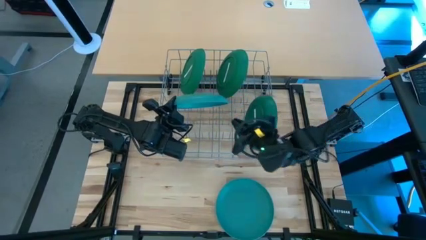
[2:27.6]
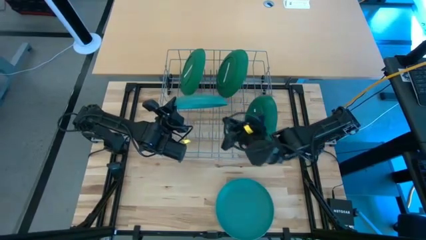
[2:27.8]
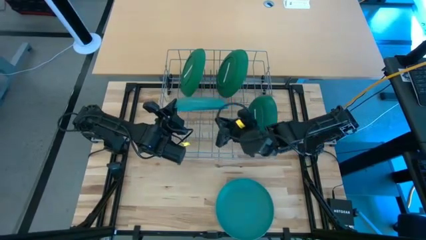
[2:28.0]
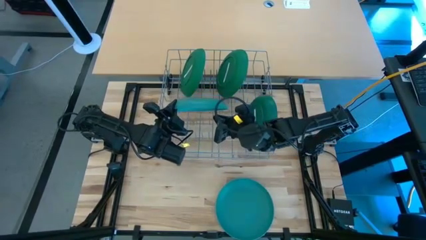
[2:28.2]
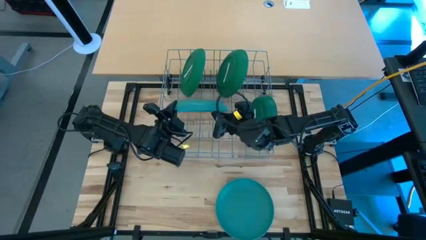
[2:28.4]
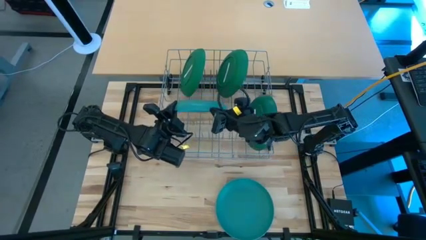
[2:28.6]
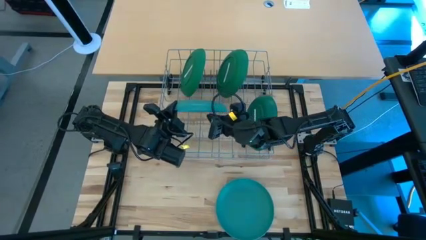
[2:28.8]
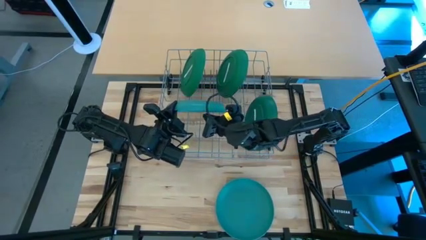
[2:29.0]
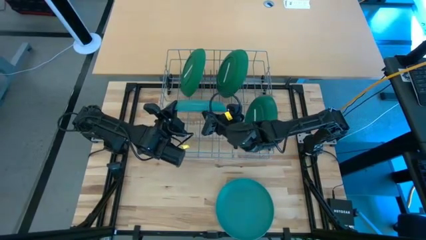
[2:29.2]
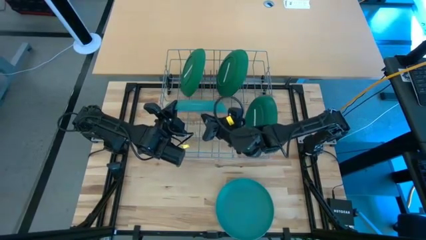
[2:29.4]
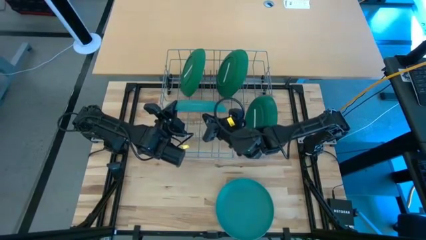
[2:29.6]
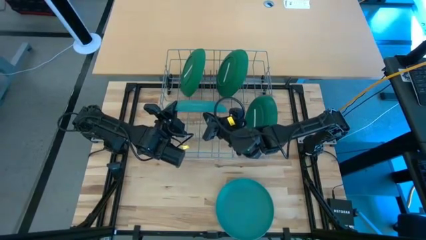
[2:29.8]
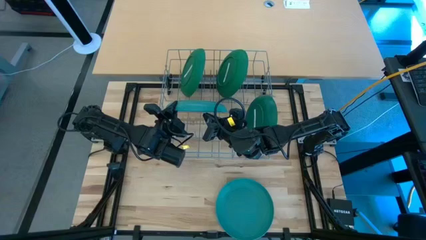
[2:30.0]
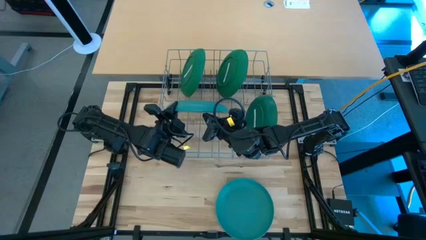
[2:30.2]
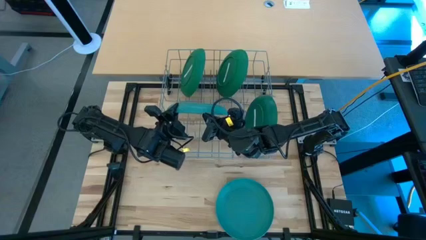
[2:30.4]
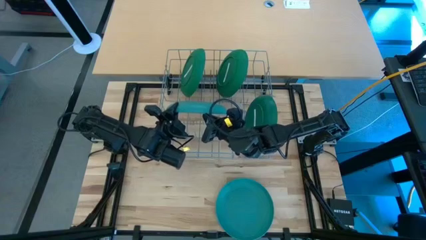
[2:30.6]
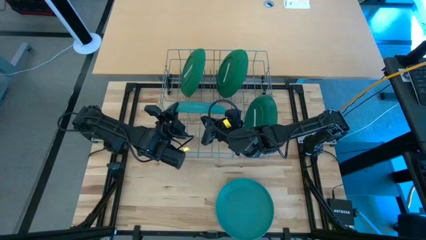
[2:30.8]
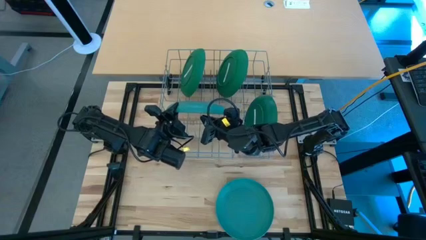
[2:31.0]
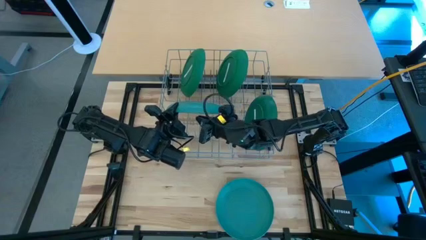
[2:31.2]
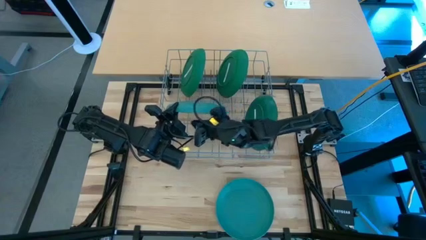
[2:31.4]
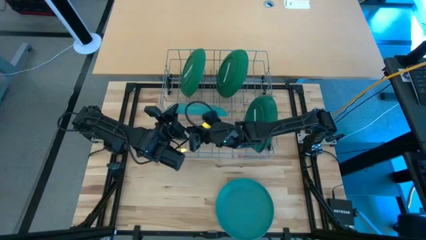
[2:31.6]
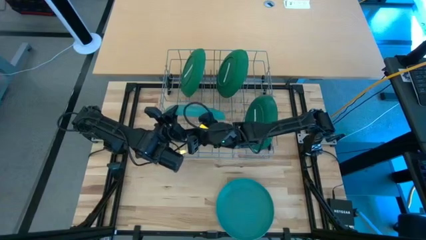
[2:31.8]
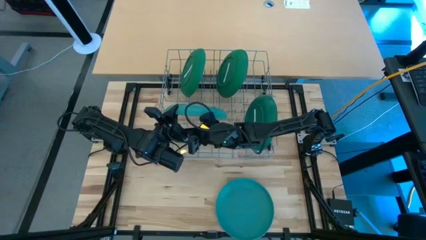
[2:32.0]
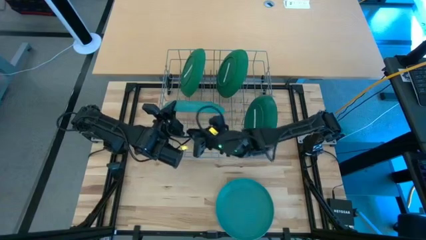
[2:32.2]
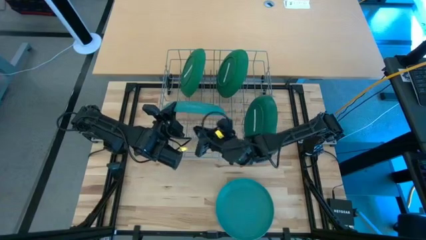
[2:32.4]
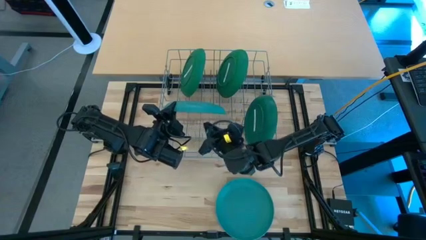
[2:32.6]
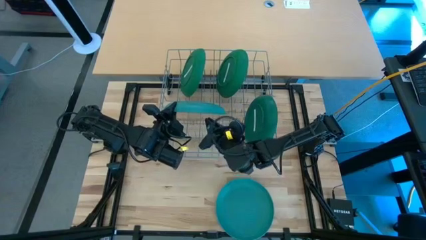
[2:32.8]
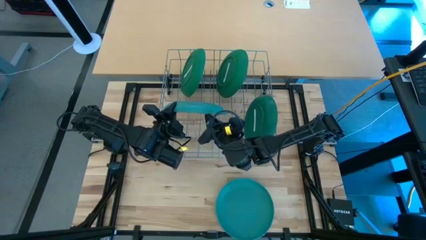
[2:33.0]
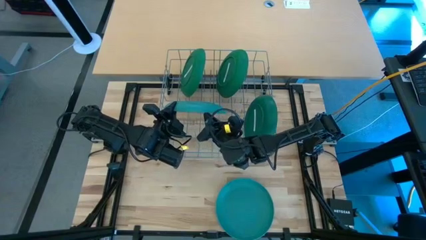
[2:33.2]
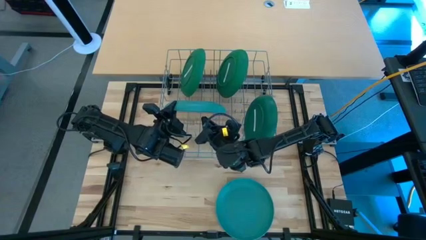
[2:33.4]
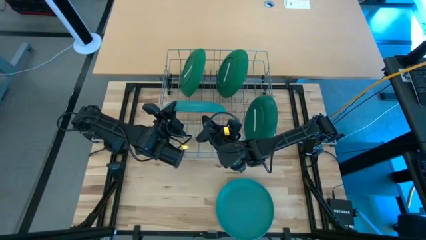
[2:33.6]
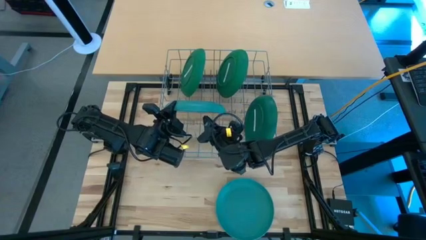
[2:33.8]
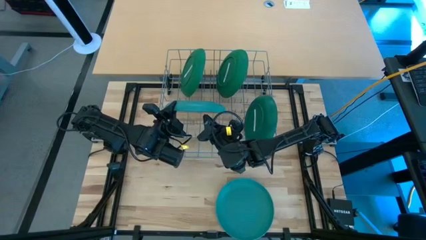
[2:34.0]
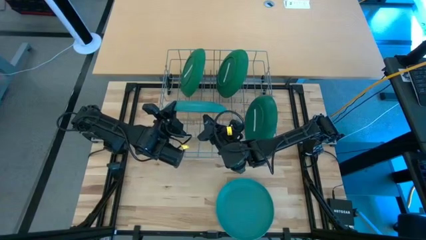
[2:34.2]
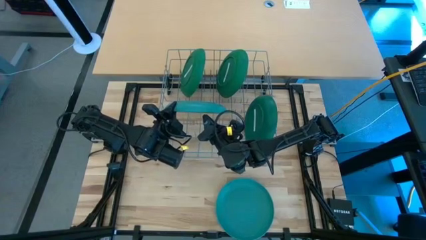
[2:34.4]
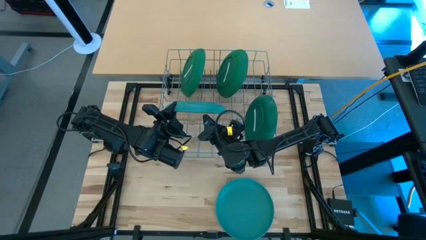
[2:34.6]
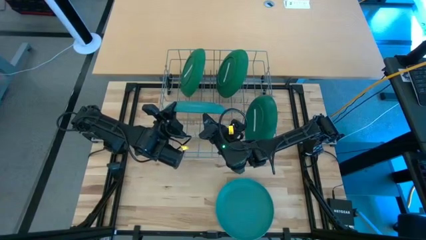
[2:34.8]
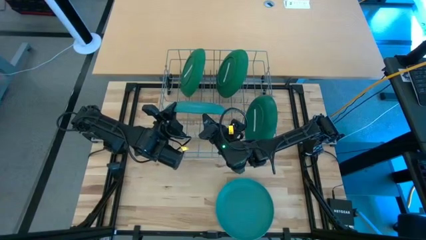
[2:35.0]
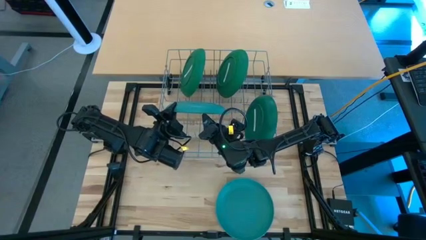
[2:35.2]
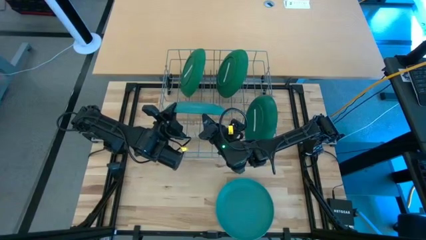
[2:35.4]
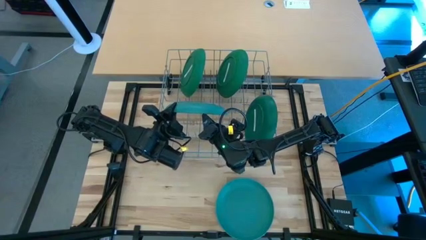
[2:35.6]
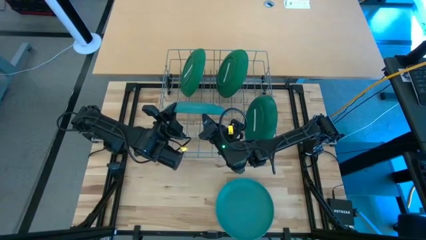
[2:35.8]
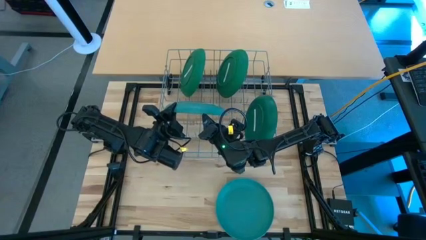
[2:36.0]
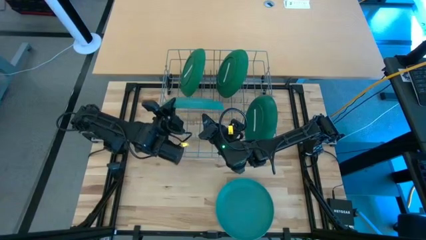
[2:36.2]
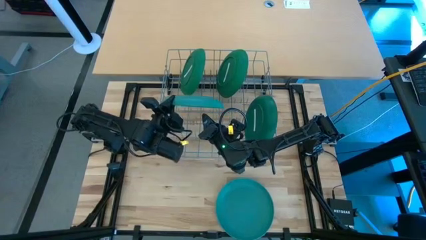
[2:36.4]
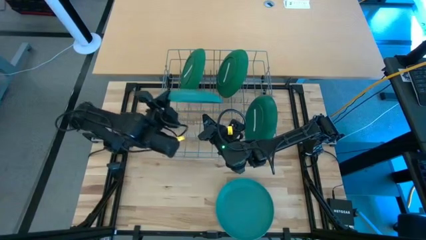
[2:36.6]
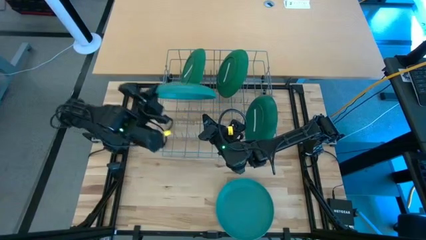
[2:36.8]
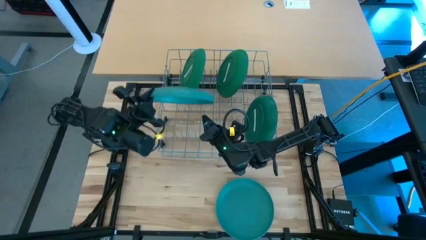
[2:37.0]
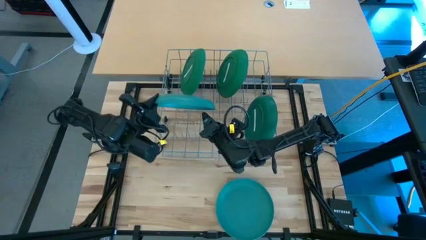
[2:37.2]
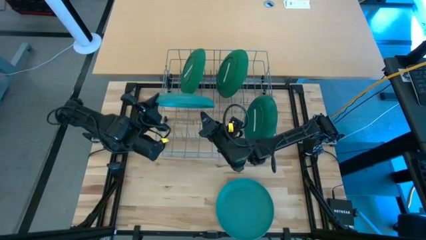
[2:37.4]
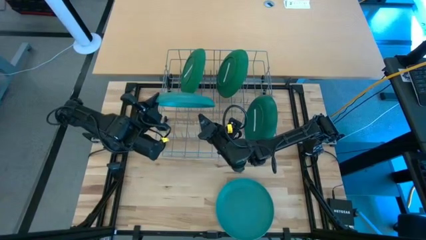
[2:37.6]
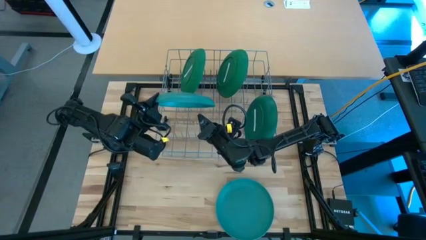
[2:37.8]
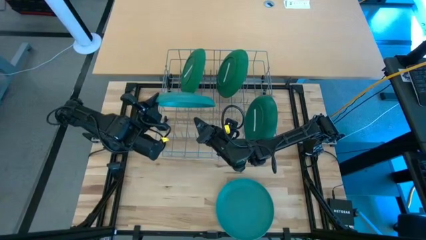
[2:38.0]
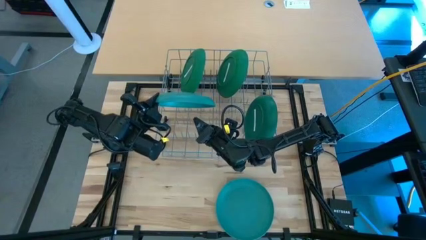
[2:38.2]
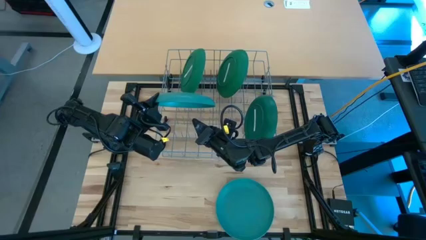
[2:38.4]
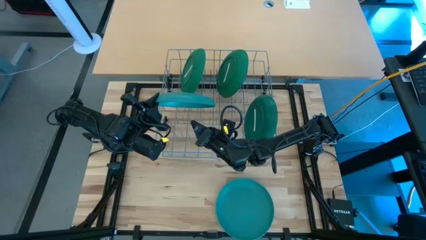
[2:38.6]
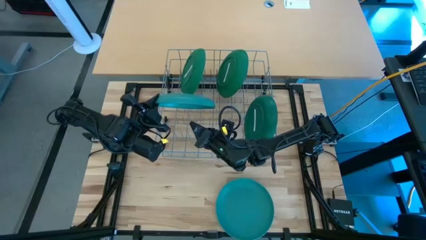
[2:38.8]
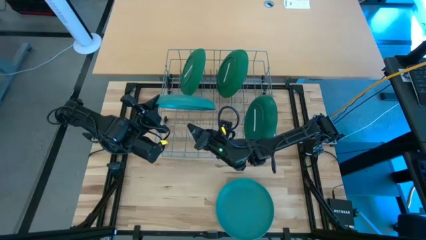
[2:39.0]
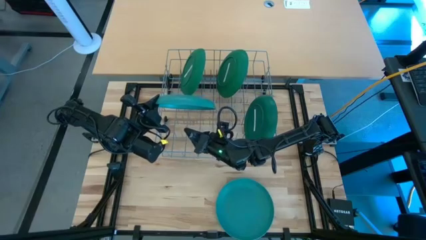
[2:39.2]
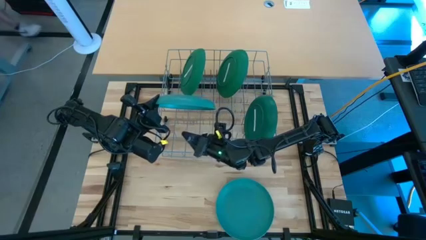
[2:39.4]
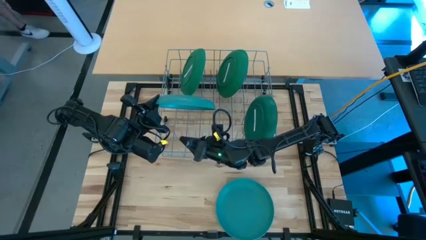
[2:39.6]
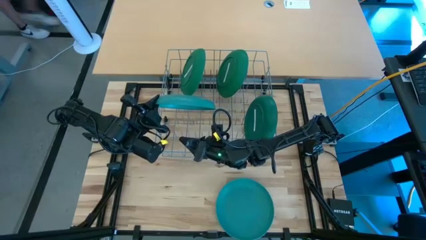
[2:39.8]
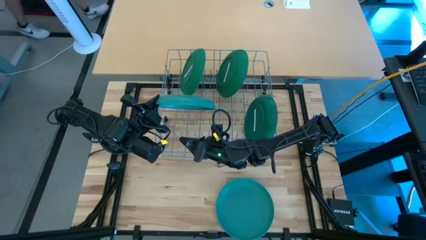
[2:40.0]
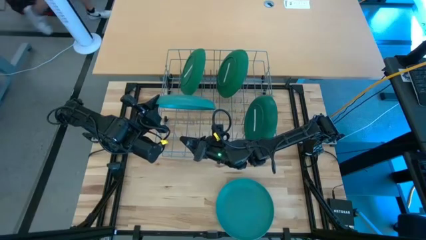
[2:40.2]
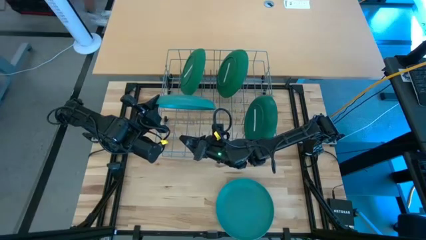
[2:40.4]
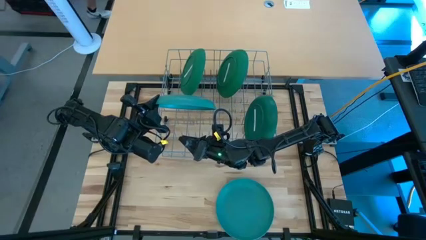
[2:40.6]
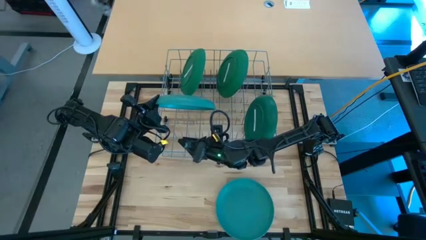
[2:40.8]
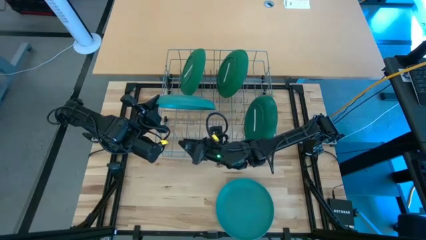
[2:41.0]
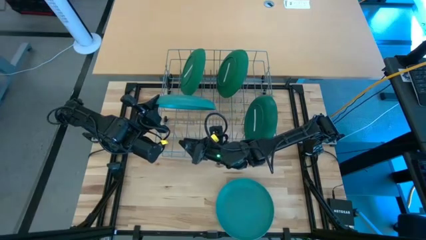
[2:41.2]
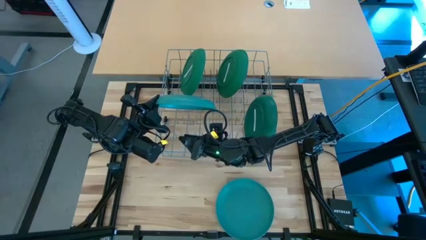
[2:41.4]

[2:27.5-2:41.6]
Task: Sort dishes
Put the top light green plate in the dish rack
